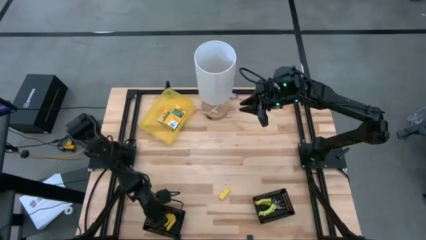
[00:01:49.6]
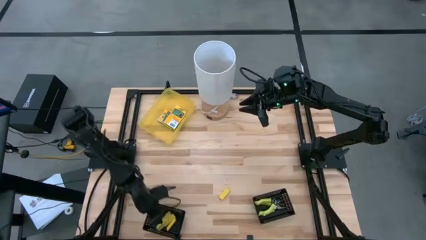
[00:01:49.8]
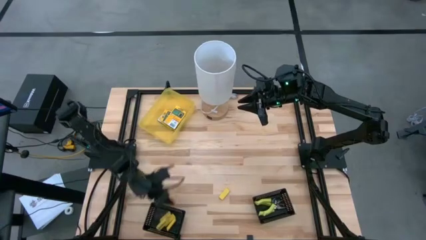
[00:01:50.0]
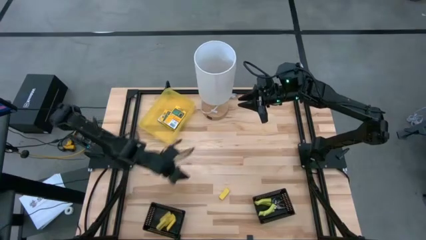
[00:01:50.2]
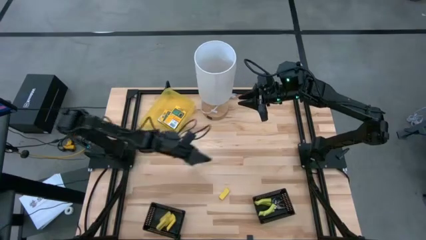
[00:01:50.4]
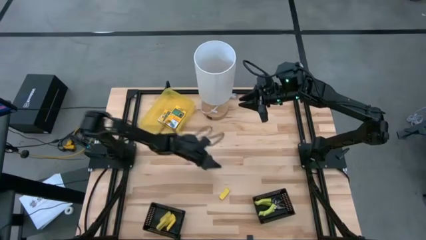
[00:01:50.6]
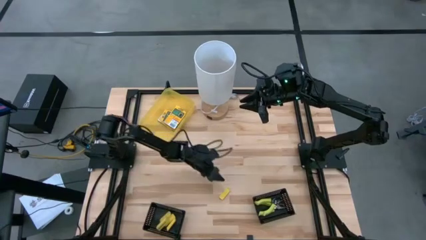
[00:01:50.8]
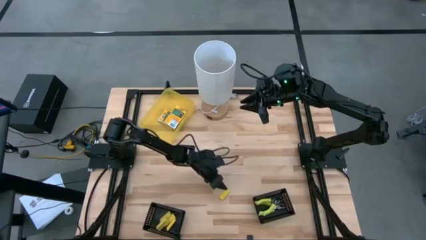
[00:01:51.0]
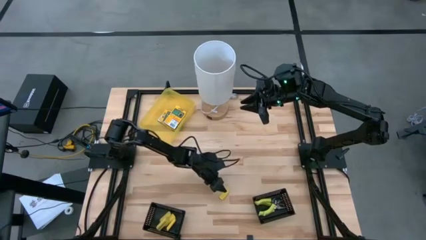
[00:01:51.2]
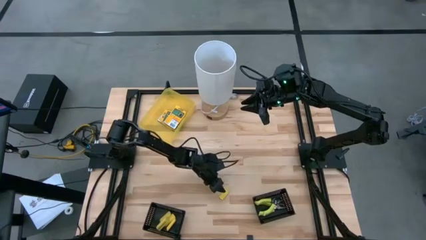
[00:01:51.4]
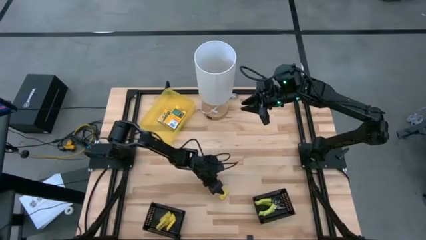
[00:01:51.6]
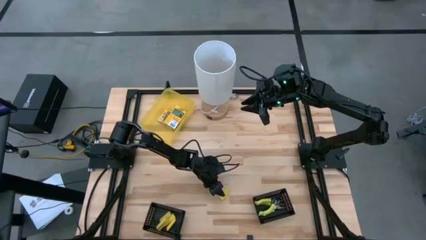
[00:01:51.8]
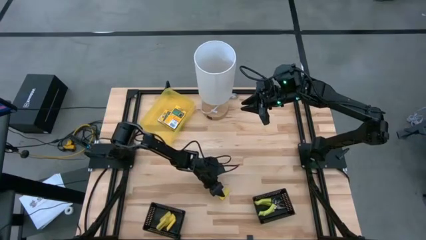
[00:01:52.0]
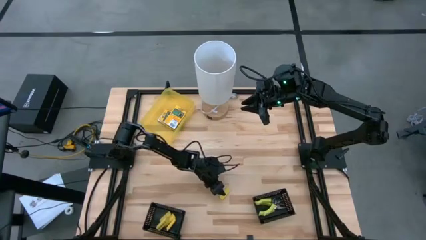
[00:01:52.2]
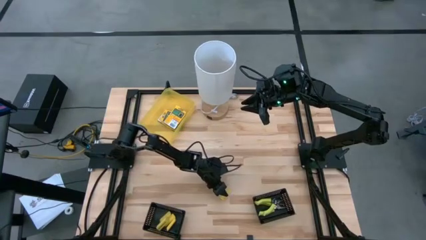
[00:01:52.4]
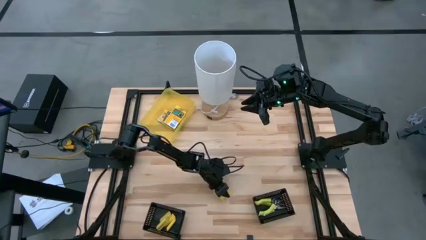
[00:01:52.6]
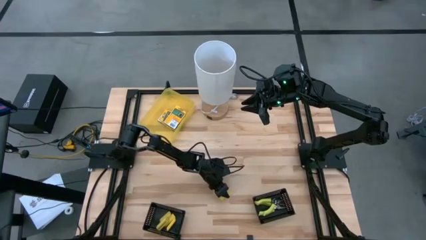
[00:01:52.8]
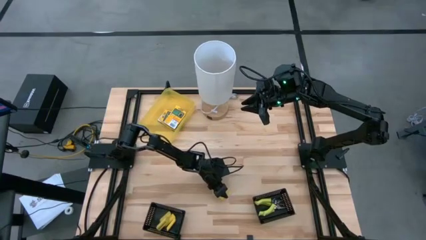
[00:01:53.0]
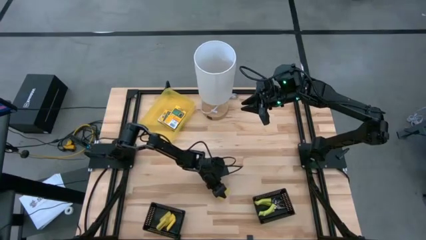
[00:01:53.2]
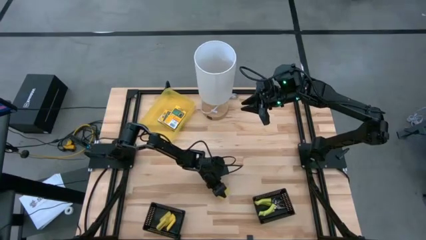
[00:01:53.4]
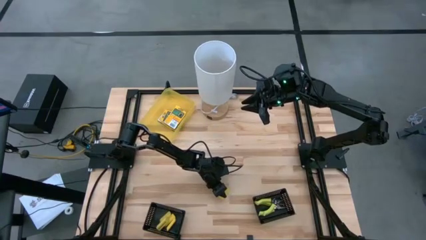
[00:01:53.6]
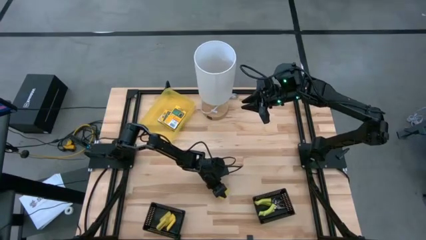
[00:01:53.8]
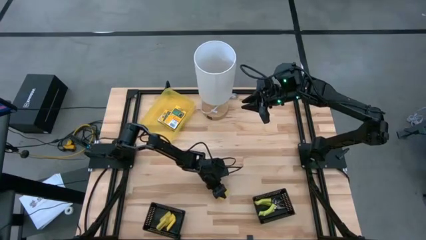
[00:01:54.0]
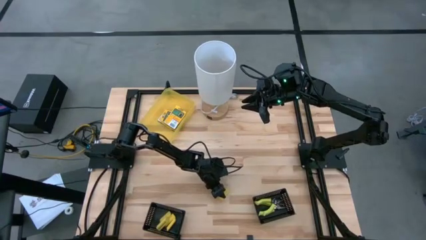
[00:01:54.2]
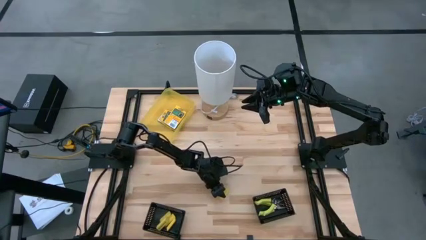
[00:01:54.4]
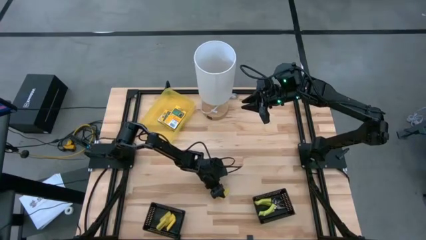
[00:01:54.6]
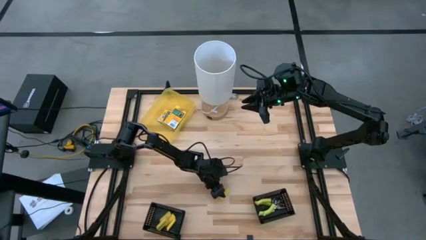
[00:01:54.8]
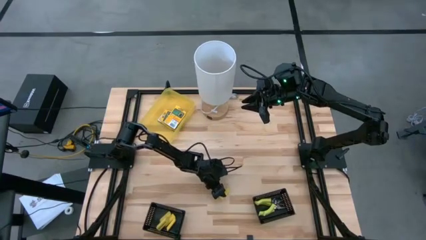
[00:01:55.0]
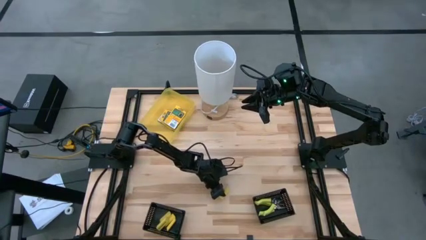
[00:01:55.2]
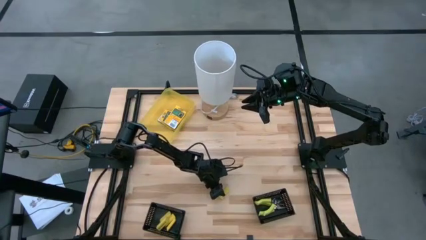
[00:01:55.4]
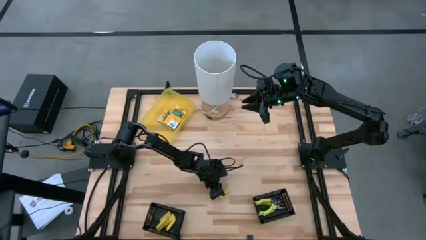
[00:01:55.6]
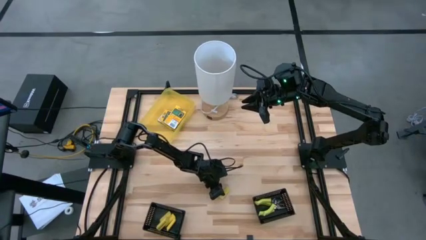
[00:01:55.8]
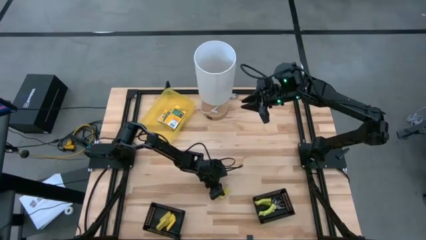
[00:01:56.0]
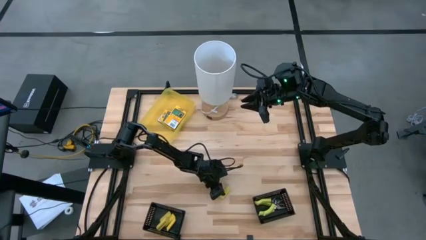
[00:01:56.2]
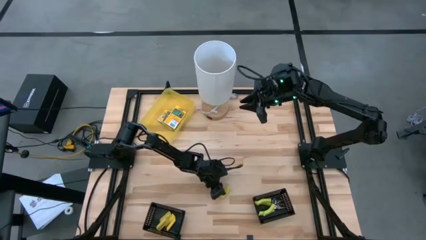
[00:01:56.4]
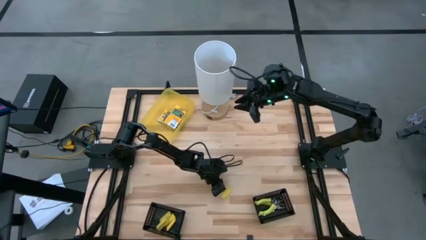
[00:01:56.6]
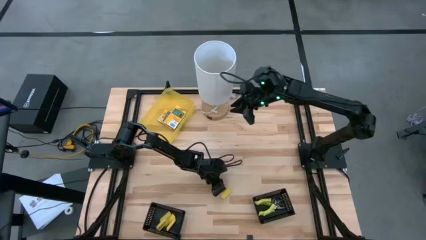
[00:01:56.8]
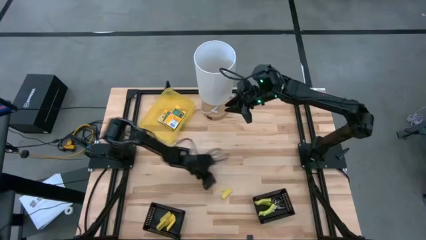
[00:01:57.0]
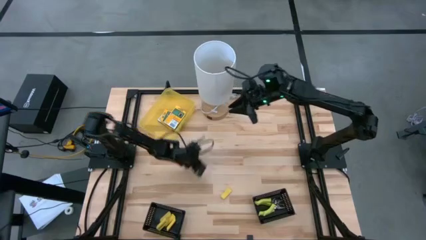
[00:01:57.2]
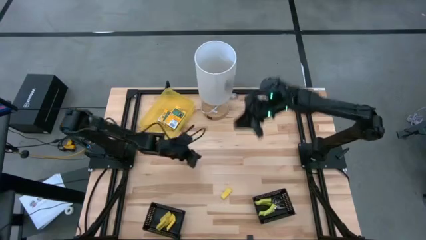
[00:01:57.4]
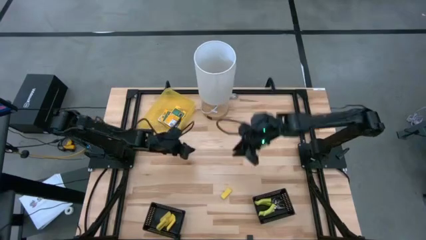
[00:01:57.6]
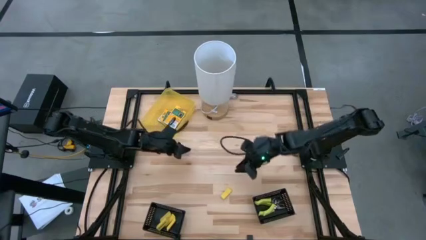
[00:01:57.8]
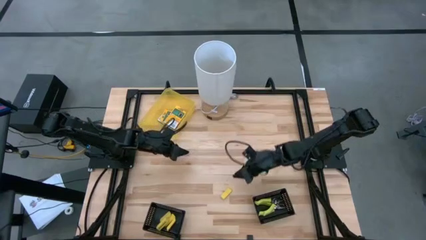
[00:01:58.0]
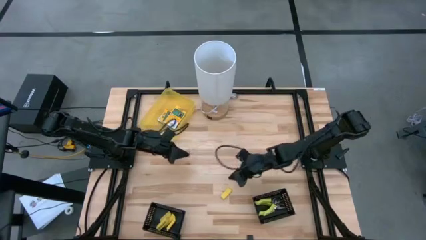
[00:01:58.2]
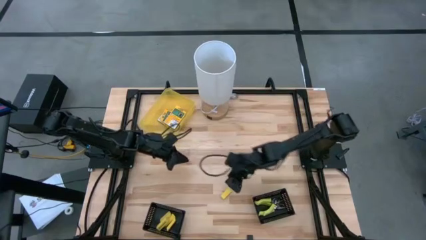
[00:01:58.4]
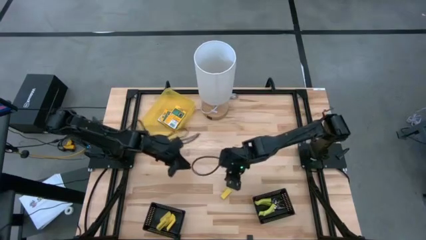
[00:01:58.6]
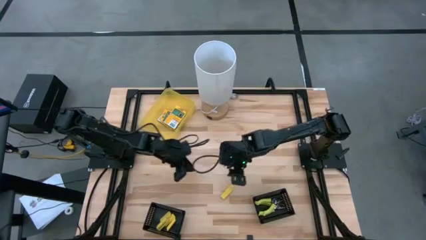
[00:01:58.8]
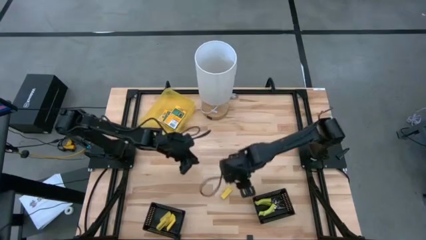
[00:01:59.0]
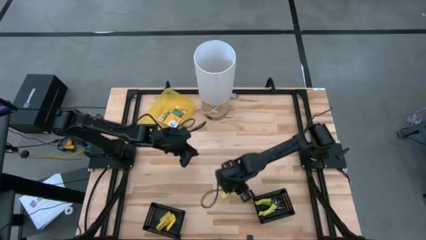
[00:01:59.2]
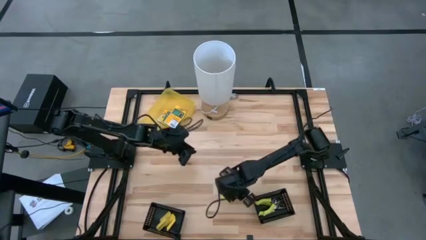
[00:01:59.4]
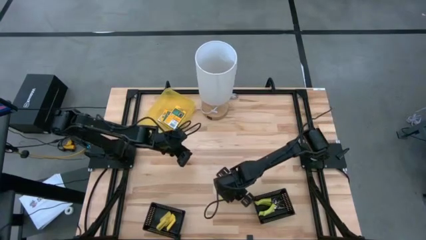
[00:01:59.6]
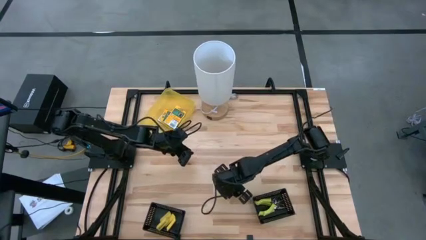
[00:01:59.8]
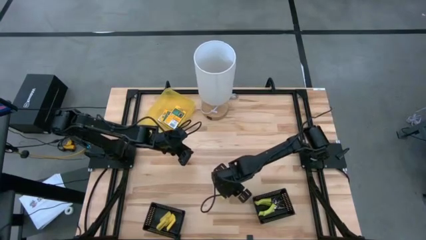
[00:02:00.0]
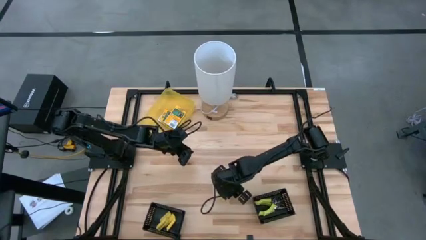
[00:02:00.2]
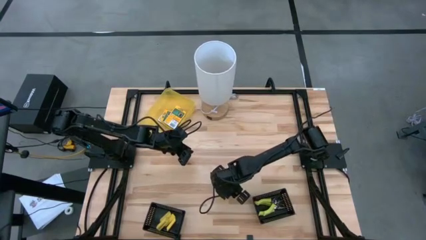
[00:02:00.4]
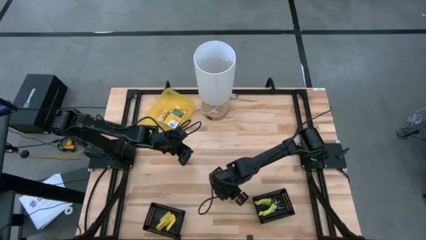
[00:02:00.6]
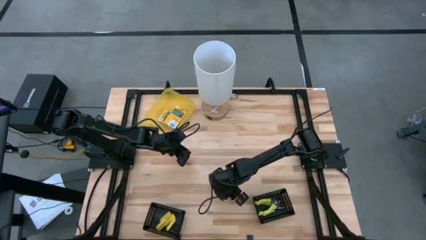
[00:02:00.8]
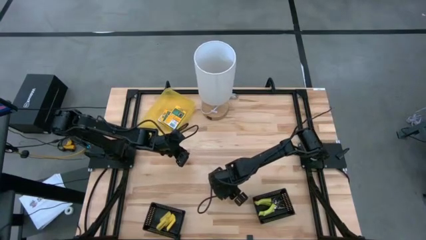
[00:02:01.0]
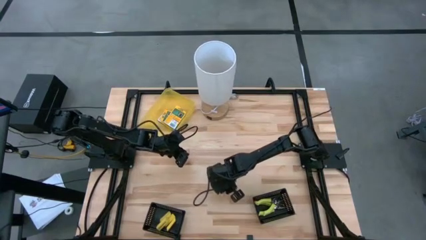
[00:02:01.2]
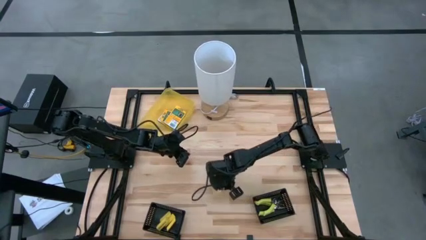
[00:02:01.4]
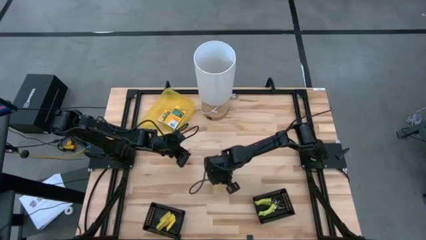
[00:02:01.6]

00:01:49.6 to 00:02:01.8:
Task: Pick & Place School Supplies
Put the eraser into the bottom left black bin

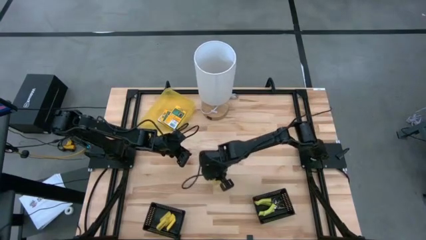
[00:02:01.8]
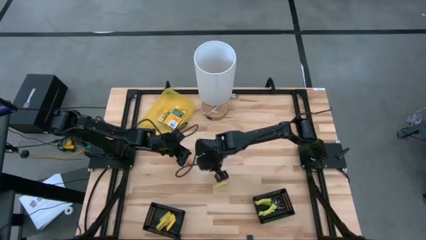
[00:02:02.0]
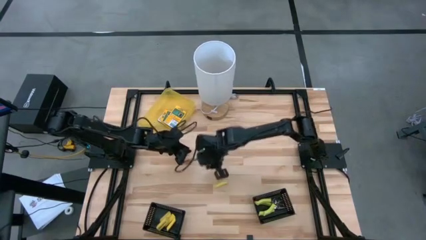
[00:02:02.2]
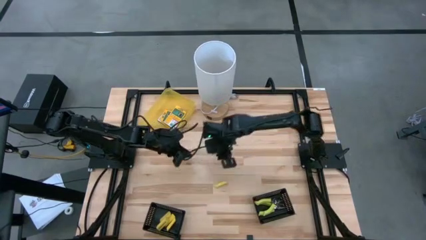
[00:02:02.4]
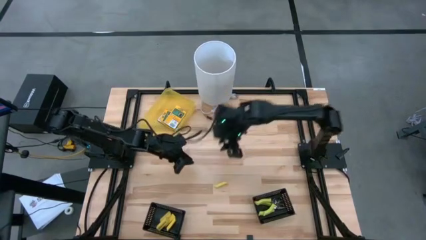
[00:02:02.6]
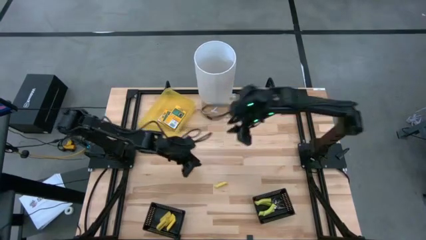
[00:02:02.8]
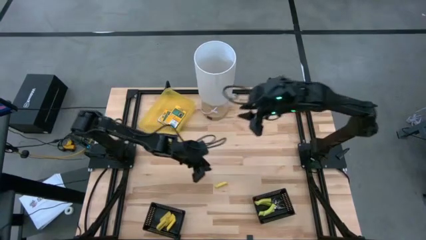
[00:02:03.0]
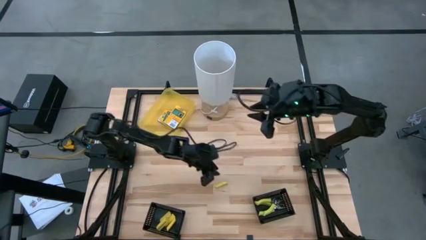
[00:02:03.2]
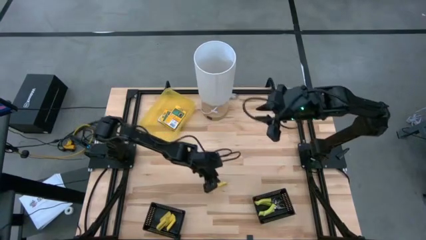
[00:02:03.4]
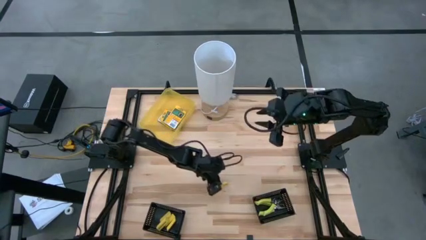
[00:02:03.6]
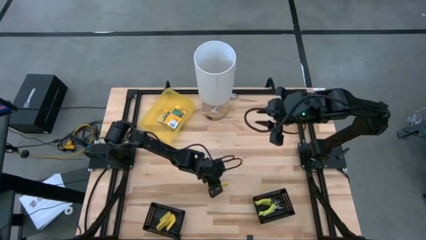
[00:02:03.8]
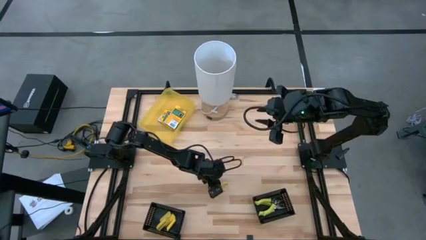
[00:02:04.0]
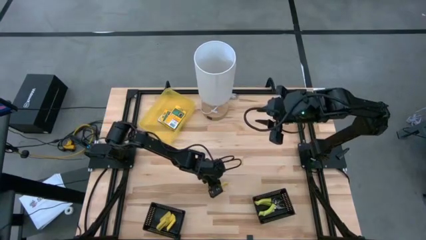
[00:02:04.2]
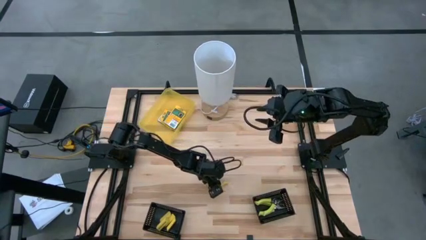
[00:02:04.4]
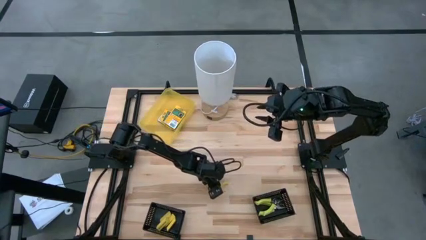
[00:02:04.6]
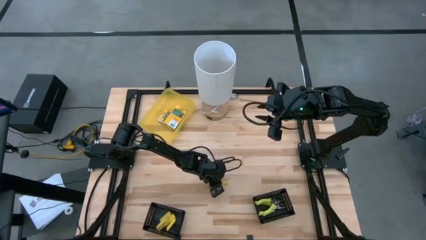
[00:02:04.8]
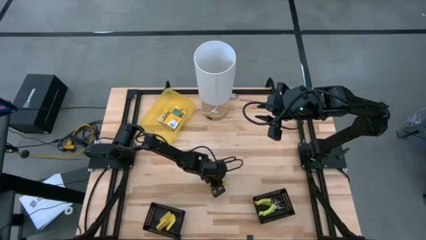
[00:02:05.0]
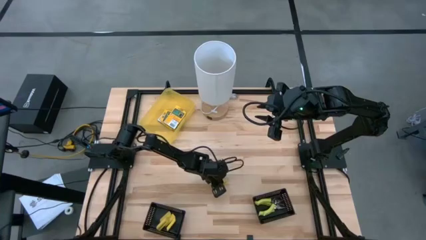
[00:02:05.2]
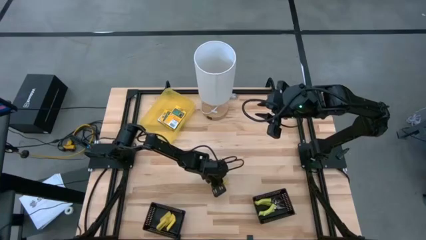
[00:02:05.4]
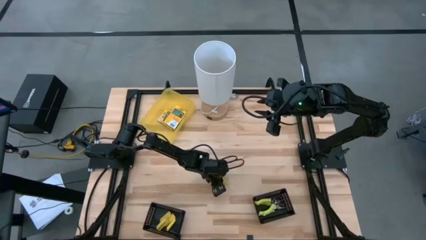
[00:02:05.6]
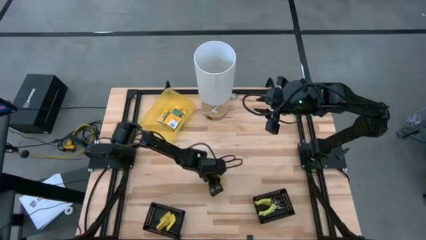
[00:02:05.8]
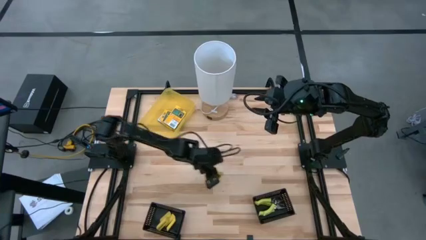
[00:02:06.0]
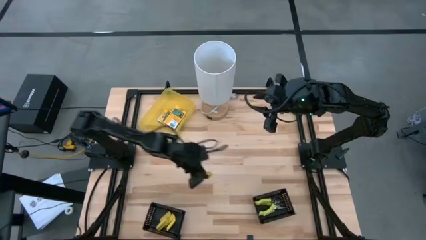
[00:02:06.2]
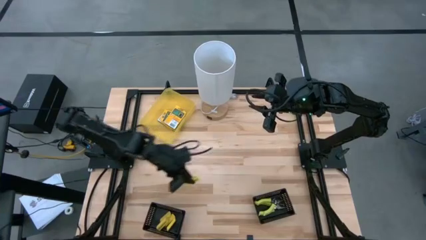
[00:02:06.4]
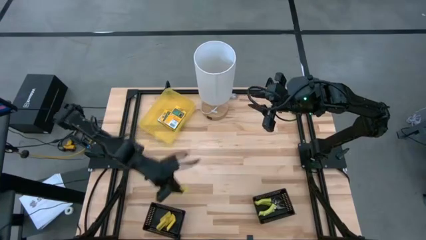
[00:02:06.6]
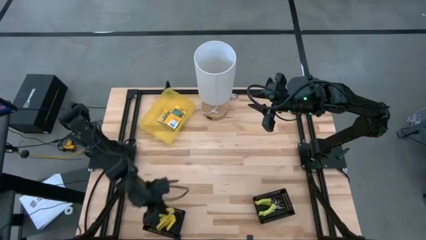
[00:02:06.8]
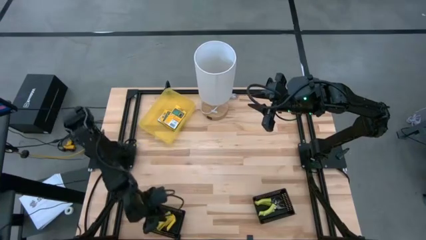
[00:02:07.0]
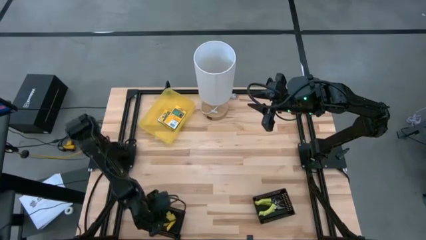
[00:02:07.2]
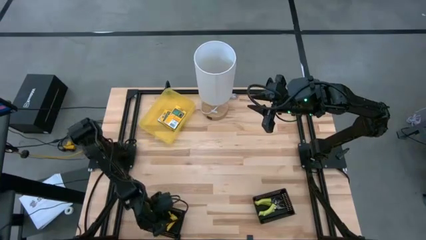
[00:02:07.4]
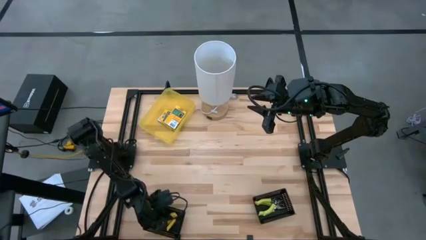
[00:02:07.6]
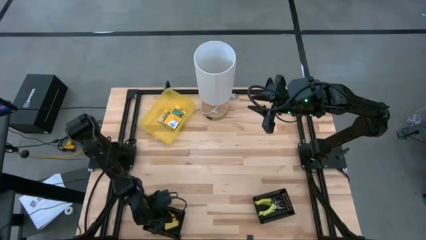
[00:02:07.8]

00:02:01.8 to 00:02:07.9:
Put the eraser into the bottom left black bin
